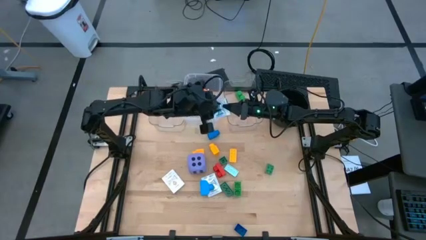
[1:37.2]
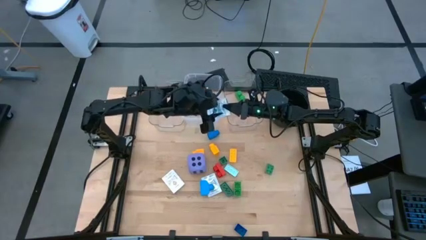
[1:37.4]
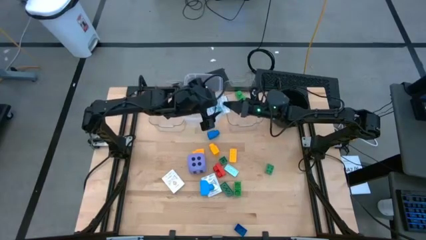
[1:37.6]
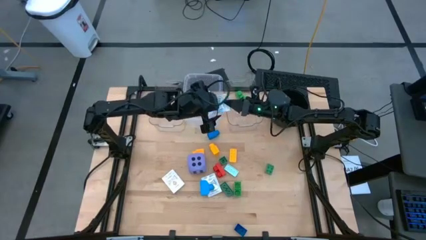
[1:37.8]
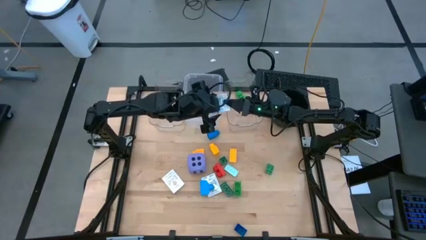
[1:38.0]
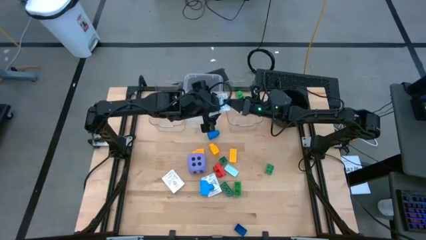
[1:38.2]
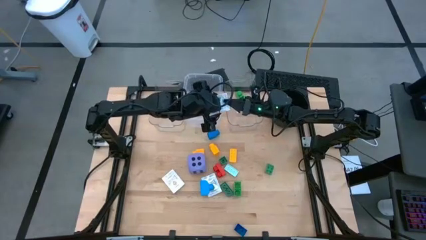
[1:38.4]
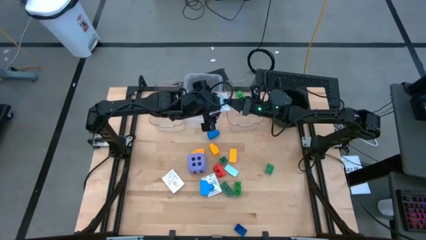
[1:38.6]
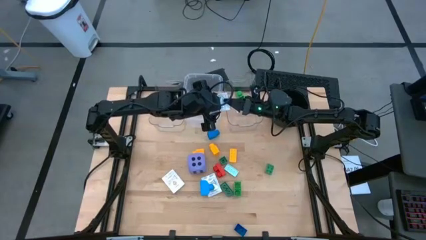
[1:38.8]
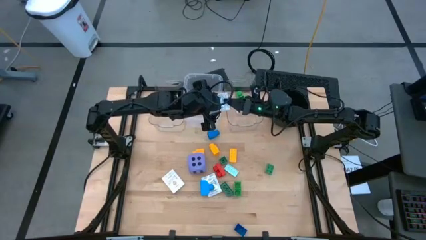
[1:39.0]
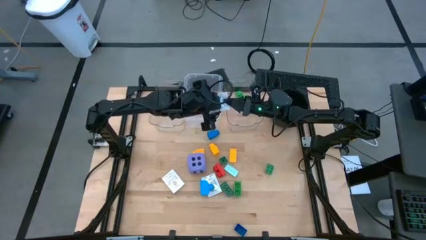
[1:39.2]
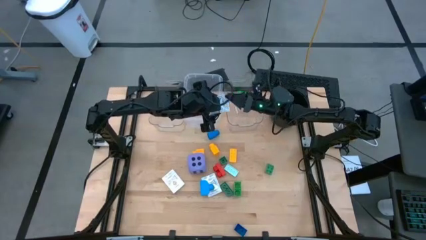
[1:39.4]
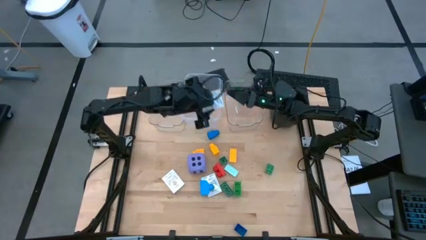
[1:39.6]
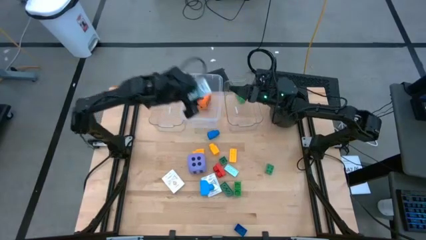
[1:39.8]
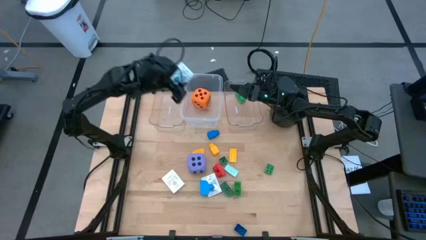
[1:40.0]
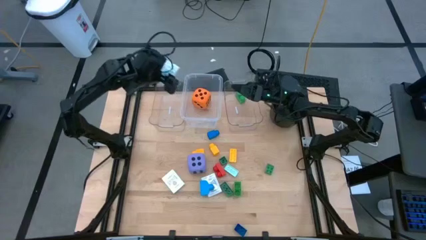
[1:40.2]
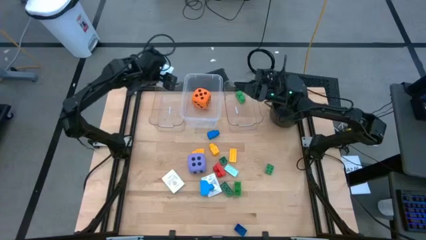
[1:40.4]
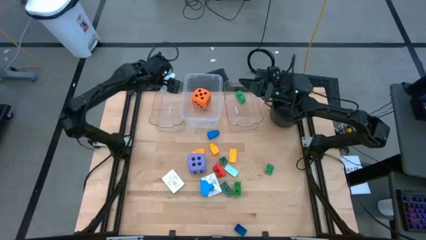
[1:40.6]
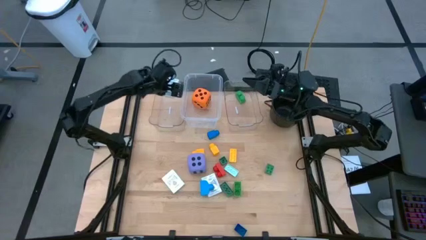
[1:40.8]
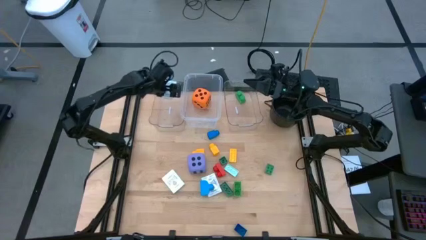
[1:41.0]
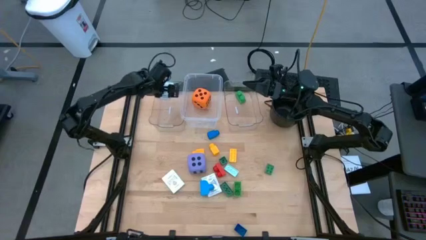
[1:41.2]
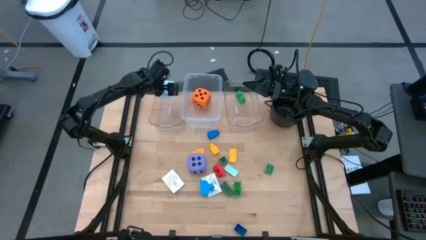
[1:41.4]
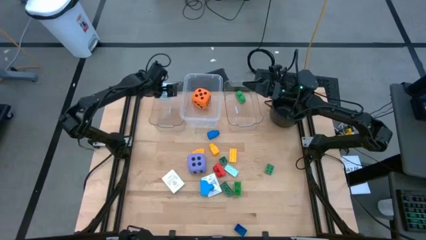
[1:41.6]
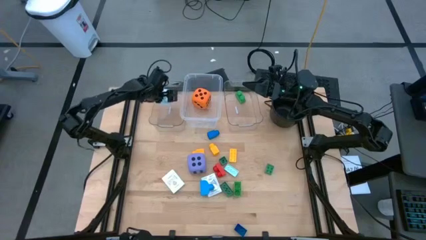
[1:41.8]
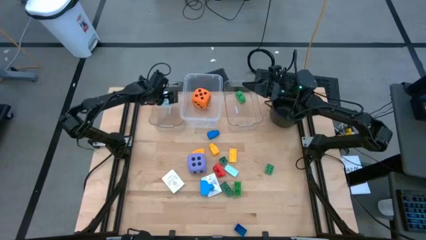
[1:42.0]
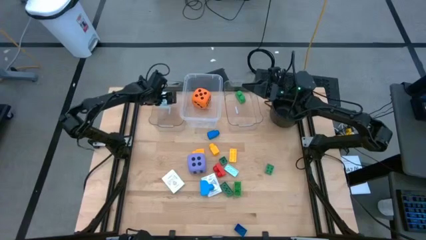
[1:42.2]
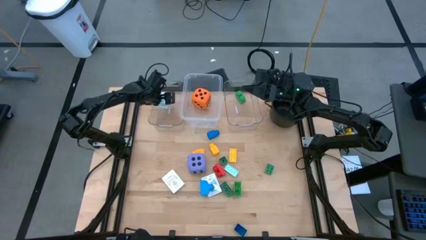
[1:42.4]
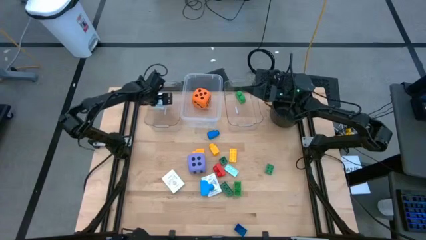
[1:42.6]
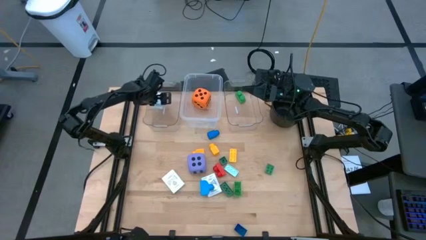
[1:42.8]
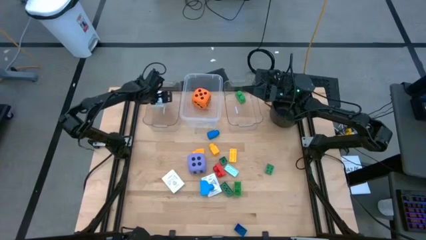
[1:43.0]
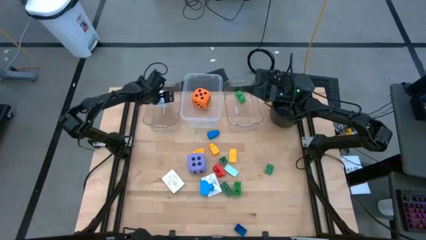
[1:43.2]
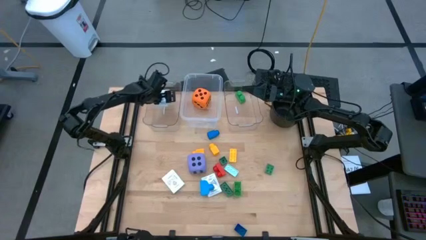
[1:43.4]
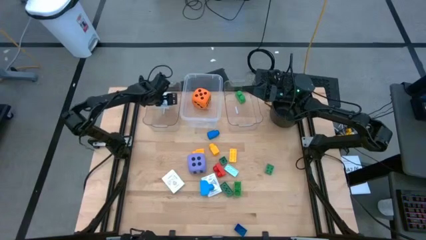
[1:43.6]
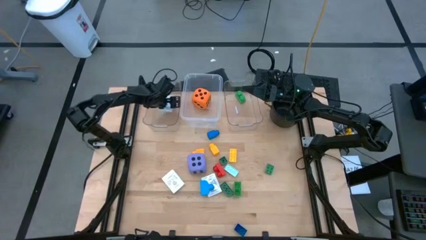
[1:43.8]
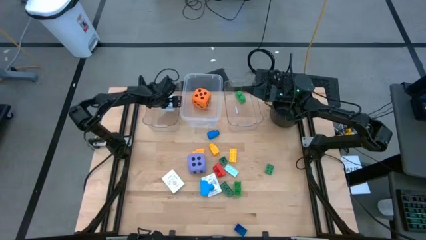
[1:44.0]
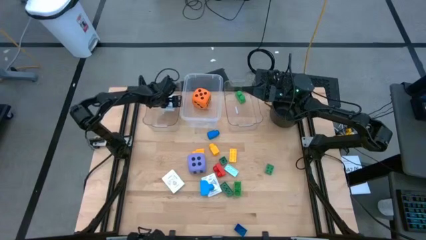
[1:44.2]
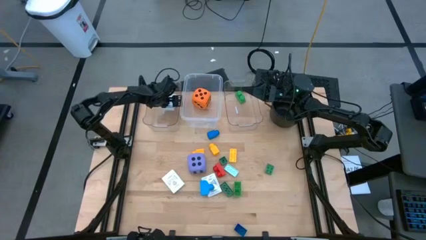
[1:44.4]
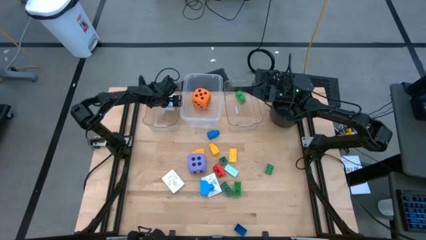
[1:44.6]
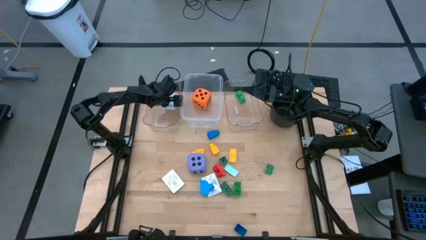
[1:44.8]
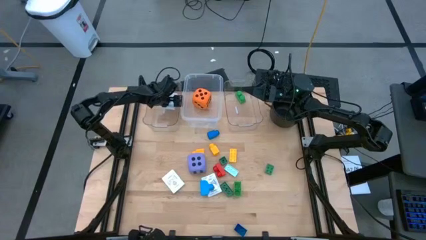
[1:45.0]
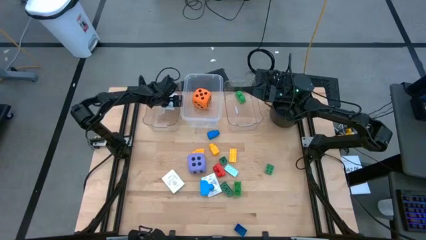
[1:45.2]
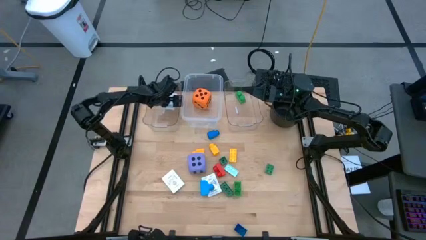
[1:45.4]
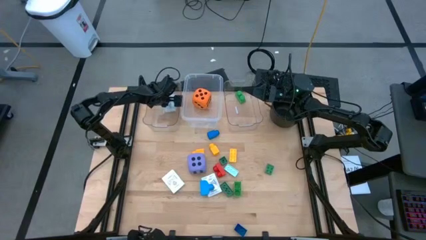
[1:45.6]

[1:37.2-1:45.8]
Task: Pick & Place Toys
Put the blue deck of cards into the left transparent bin

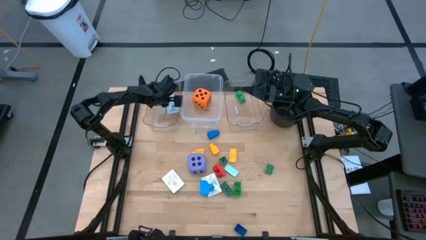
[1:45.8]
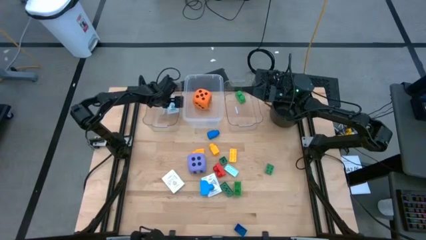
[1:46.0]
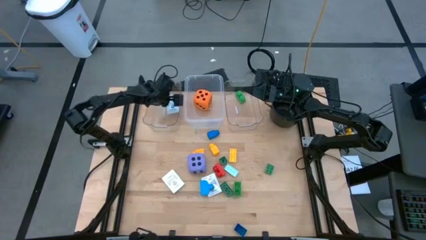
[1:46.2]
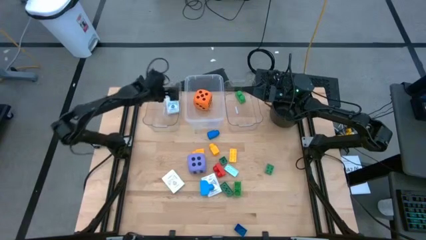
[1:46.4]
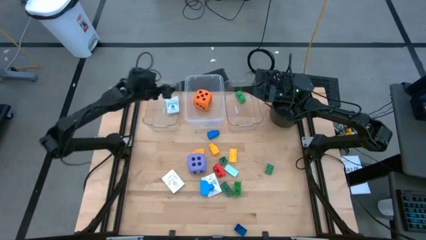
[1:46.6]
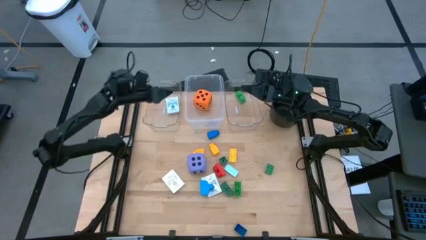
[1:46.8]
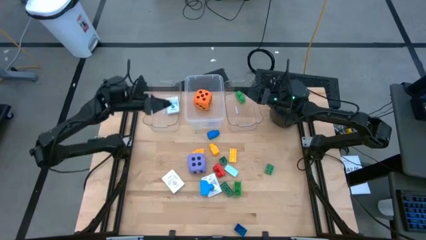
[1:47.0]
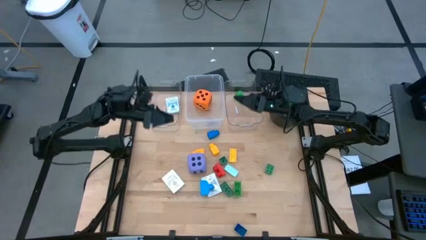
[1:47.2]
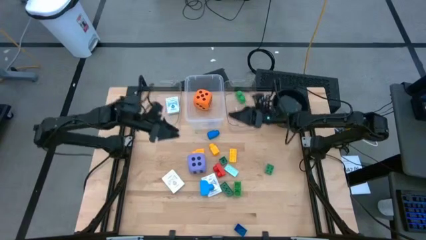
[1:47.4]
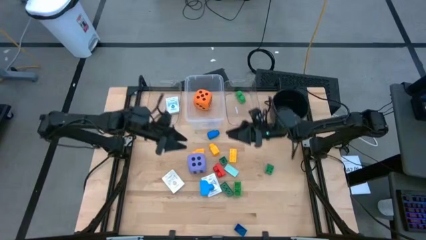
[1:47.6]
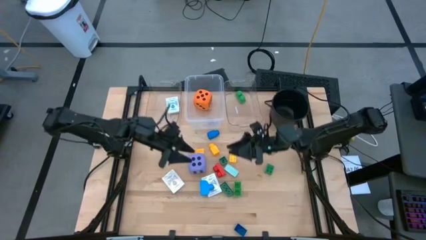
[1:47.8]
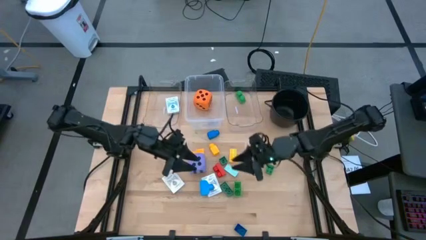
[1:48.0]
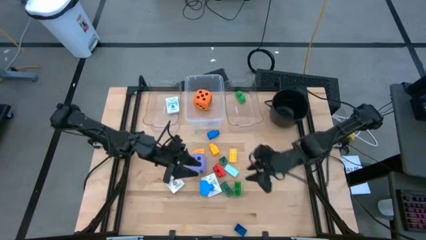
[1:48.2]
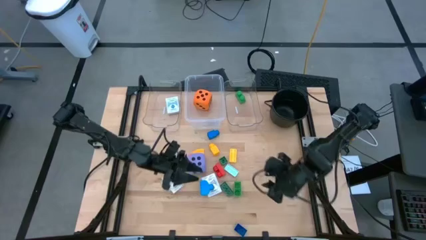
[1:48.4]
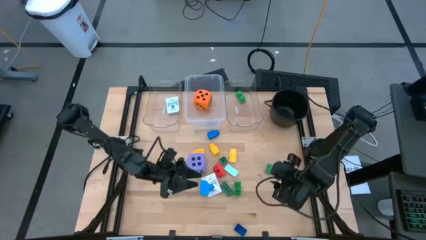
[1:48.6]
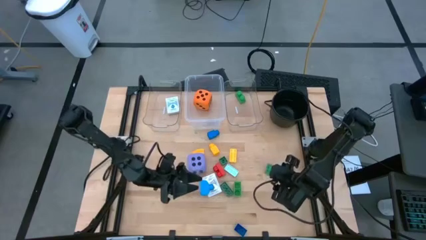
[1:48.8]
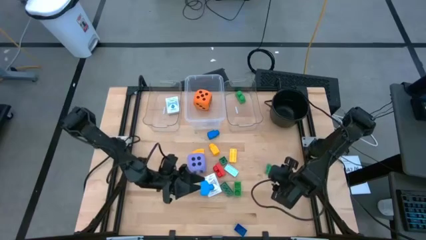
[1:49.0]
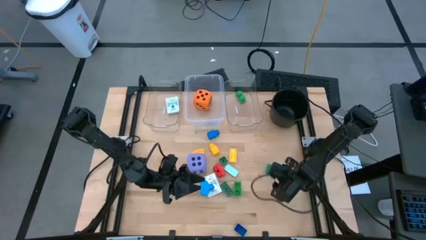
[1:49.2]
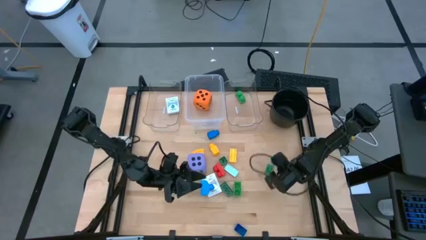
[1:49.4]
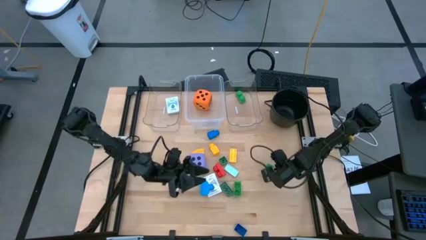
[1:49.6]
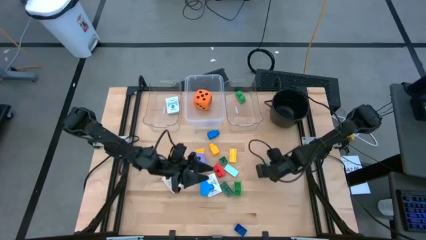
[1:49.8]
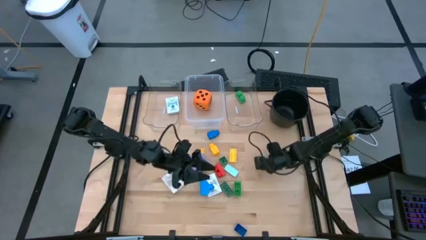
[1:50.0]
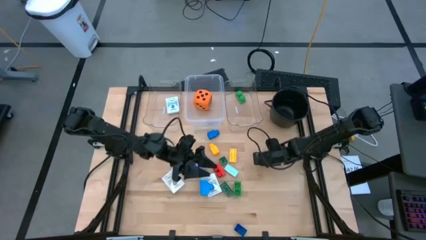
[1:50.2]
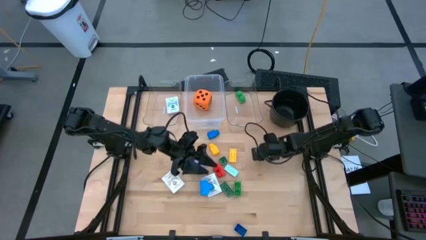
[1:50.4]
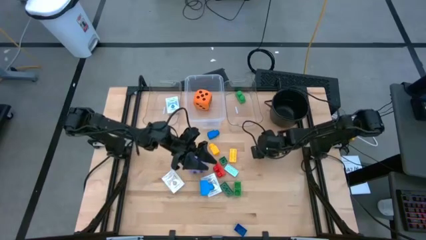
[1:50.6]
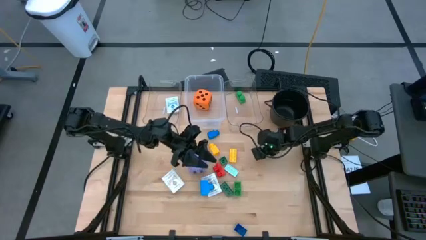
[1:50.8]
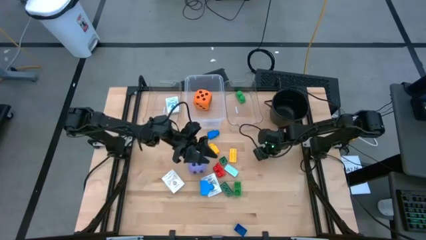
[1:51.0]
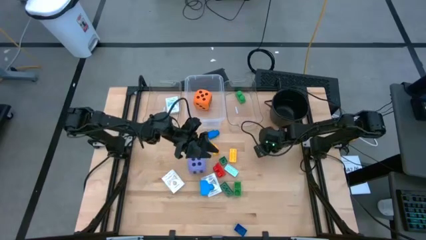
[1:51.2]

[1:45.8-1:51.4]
Put the middle right dark green game piece into the right transparent bin
